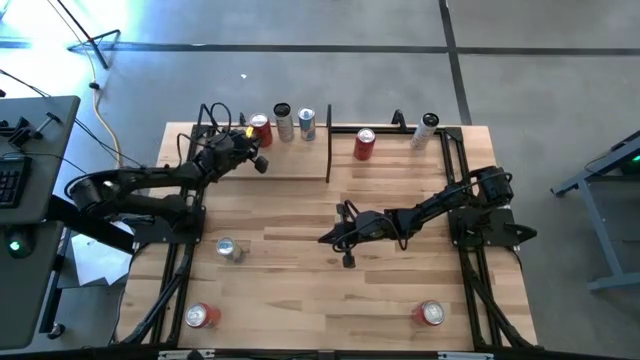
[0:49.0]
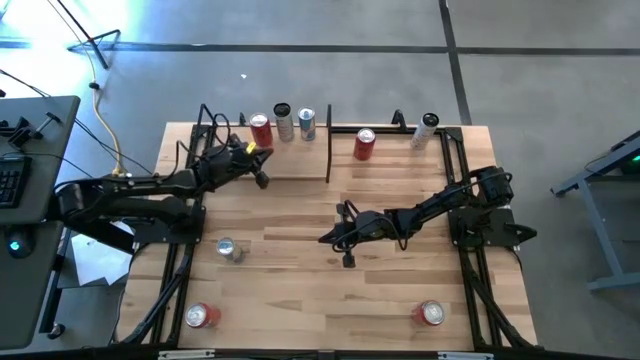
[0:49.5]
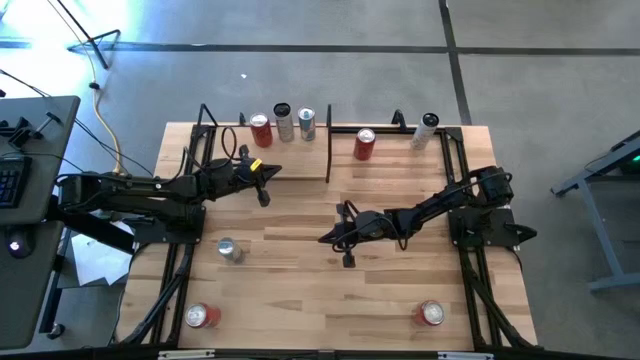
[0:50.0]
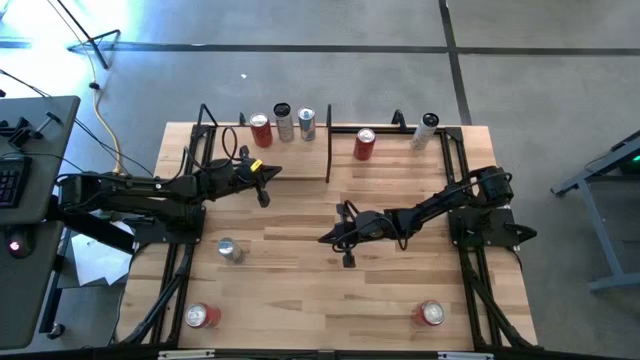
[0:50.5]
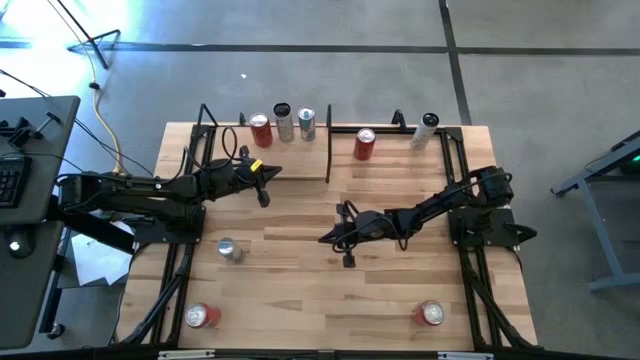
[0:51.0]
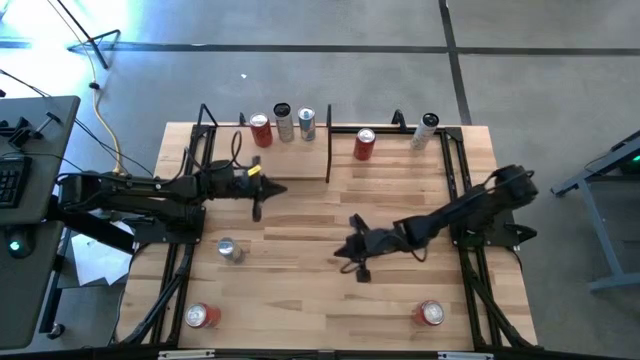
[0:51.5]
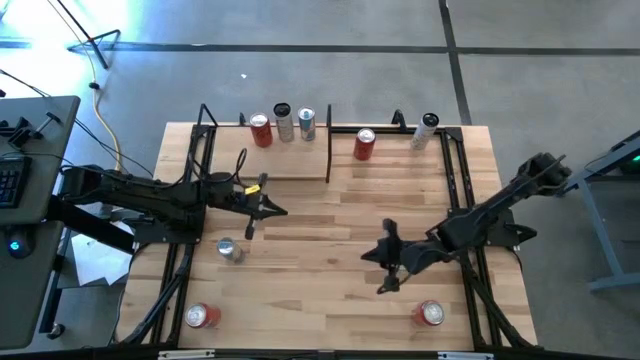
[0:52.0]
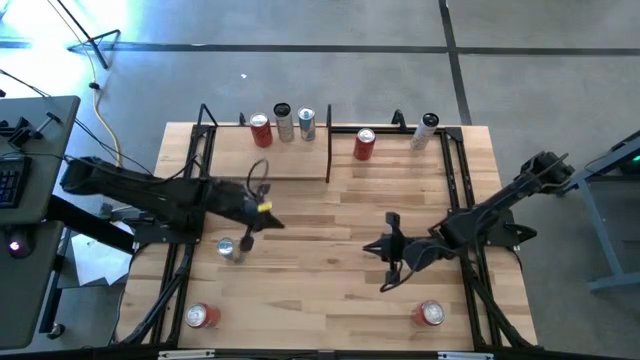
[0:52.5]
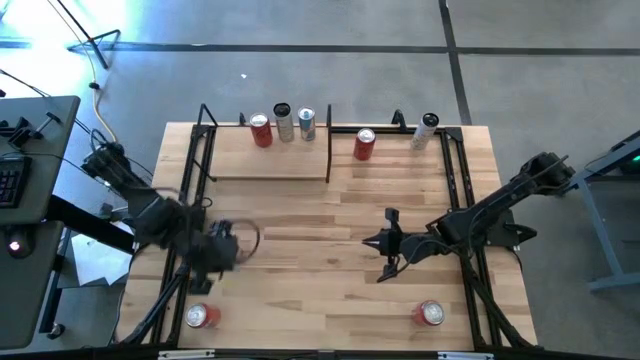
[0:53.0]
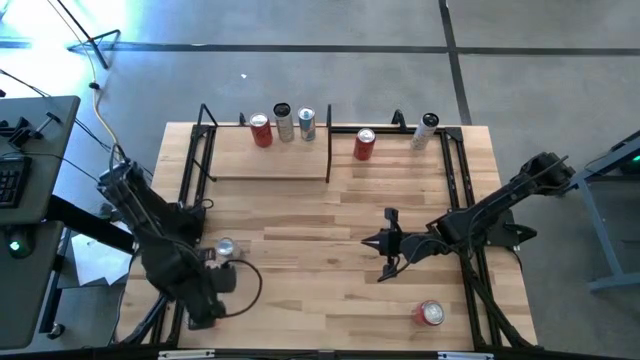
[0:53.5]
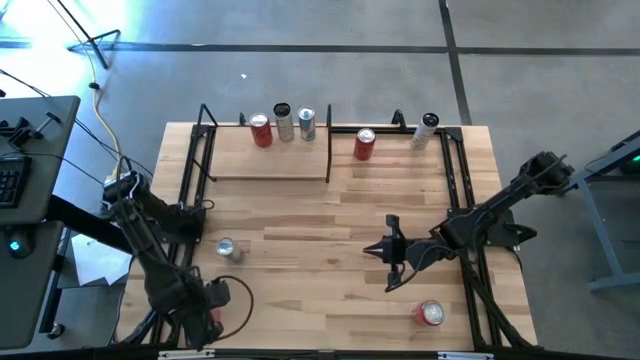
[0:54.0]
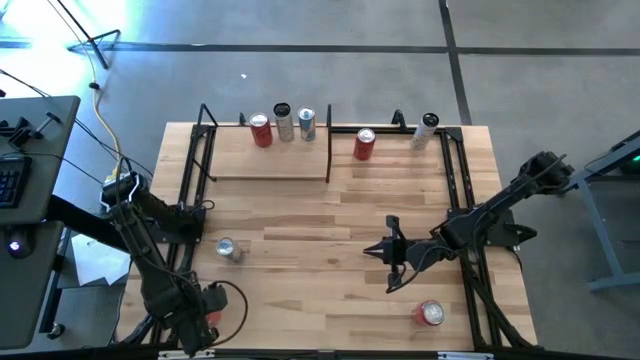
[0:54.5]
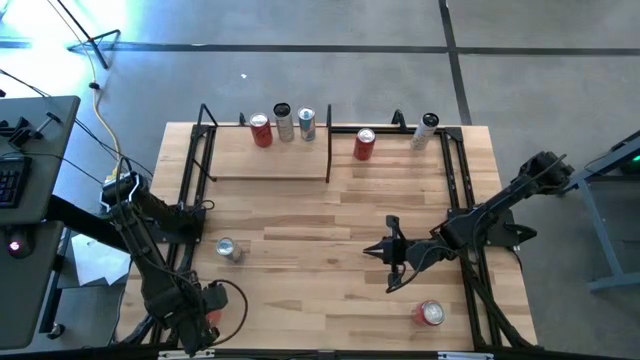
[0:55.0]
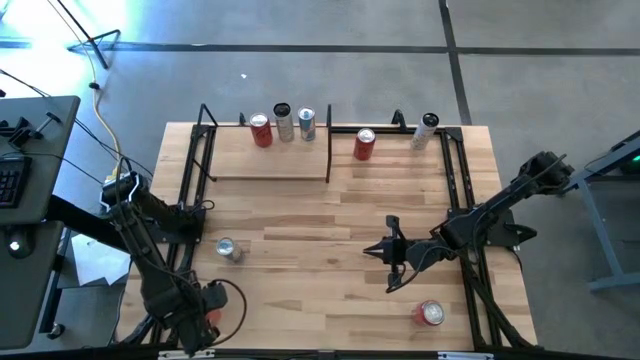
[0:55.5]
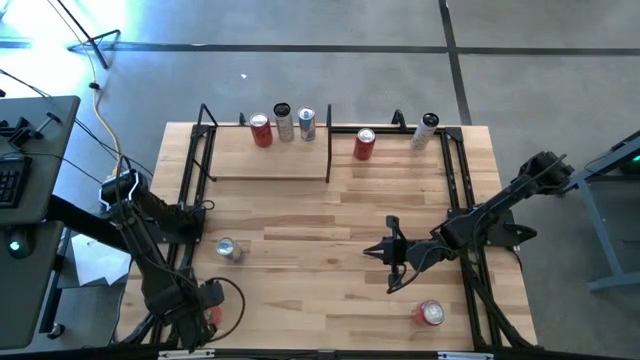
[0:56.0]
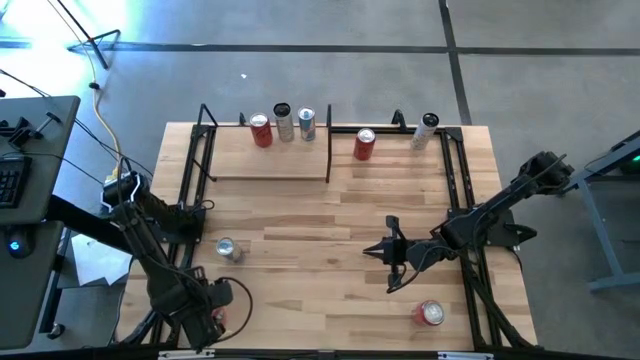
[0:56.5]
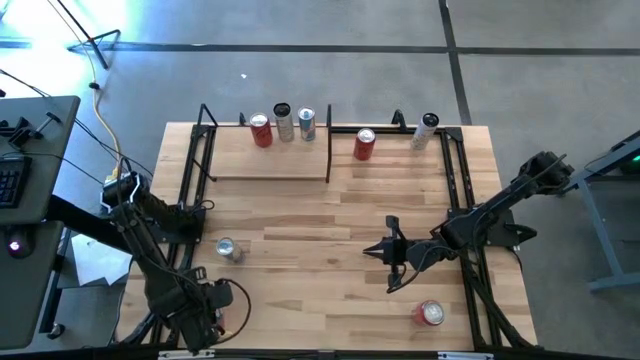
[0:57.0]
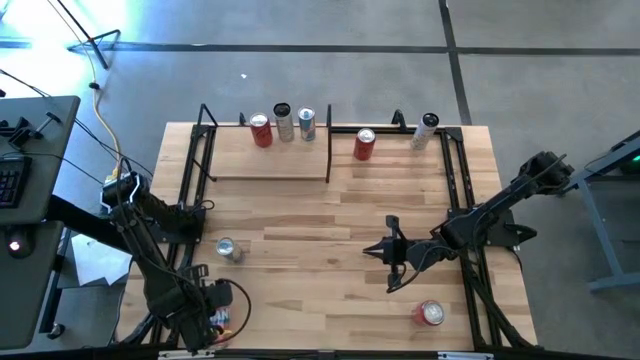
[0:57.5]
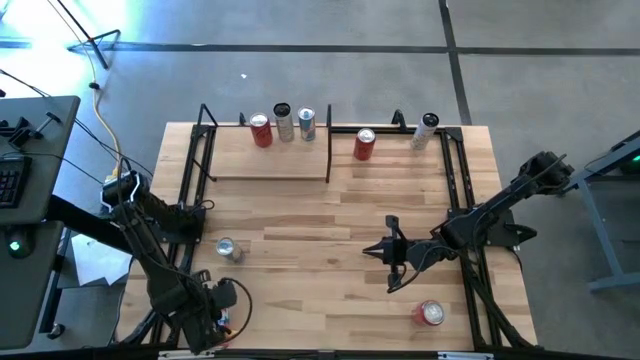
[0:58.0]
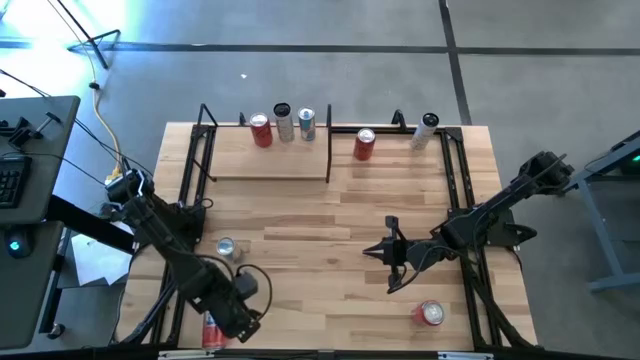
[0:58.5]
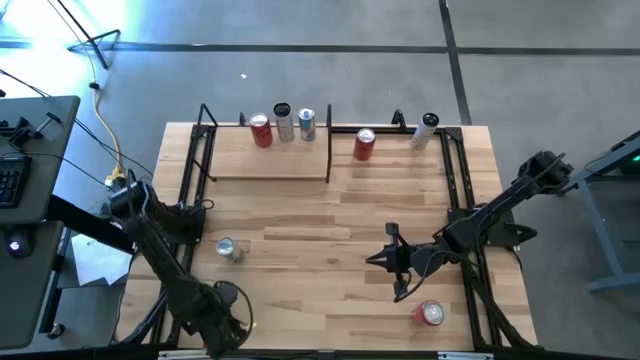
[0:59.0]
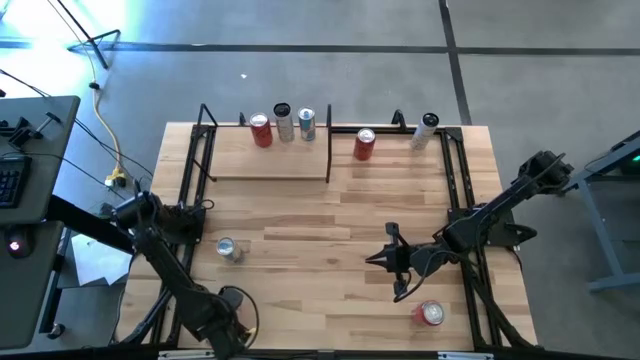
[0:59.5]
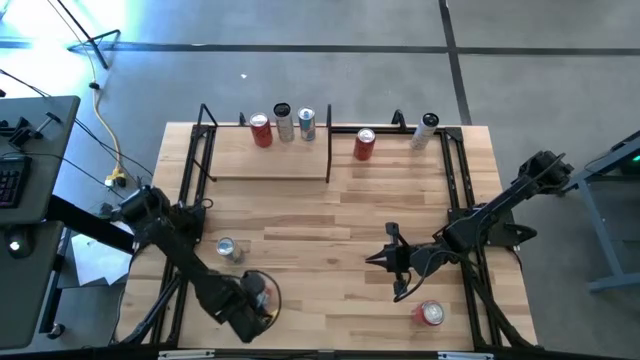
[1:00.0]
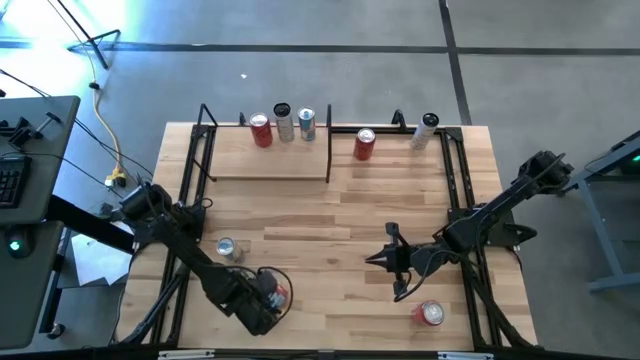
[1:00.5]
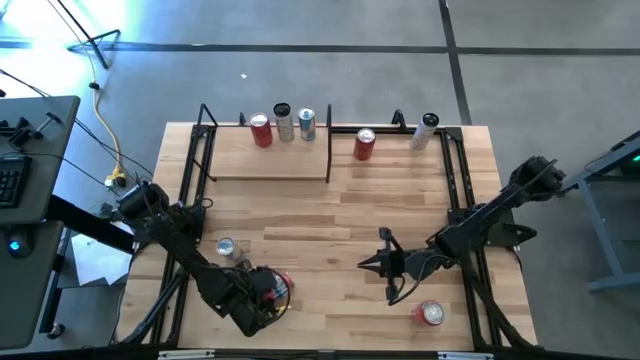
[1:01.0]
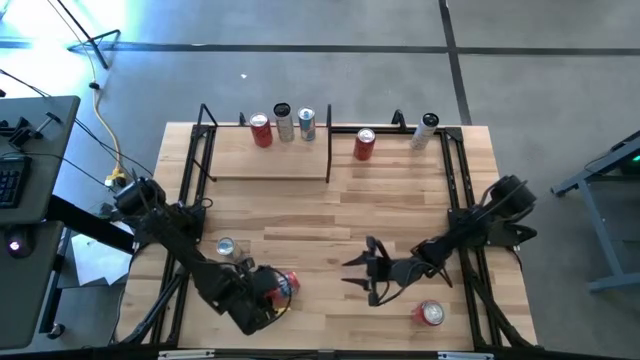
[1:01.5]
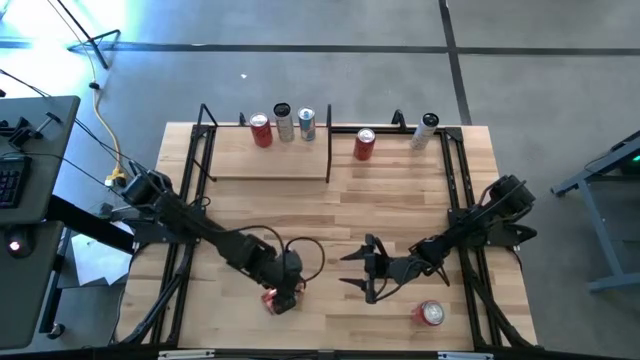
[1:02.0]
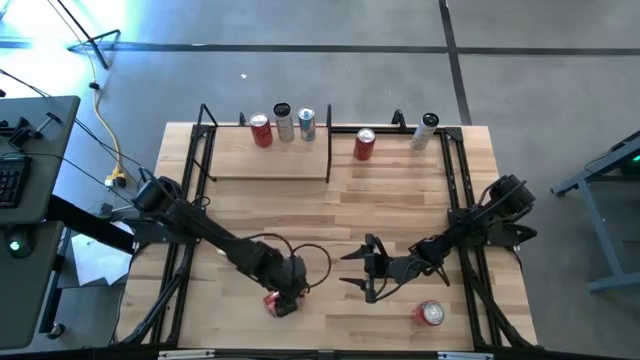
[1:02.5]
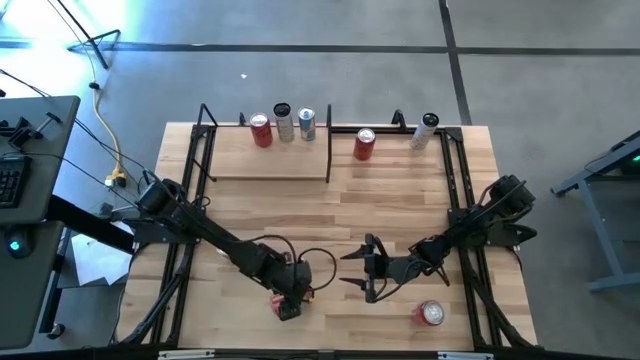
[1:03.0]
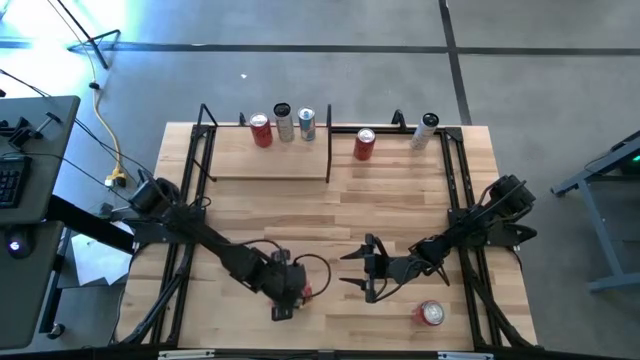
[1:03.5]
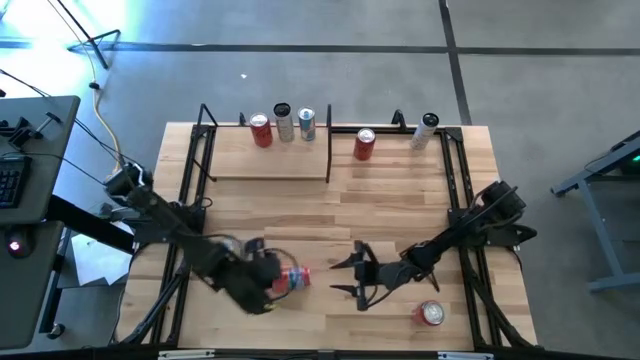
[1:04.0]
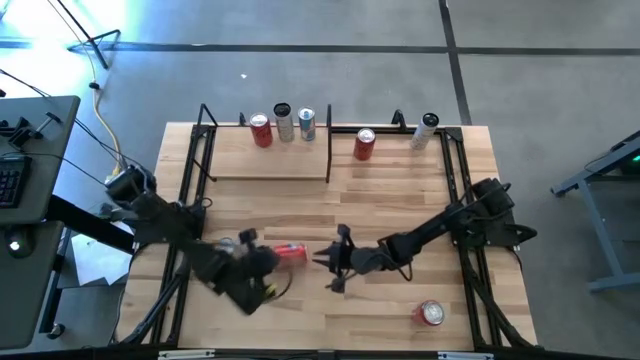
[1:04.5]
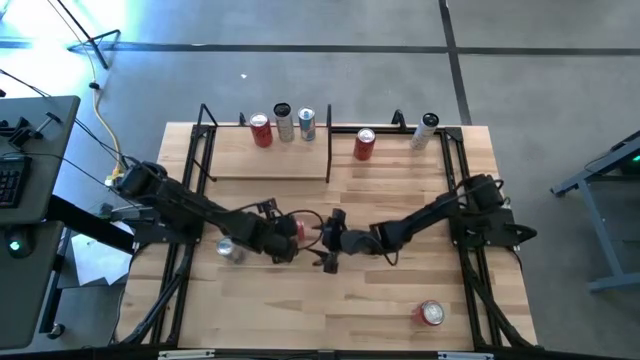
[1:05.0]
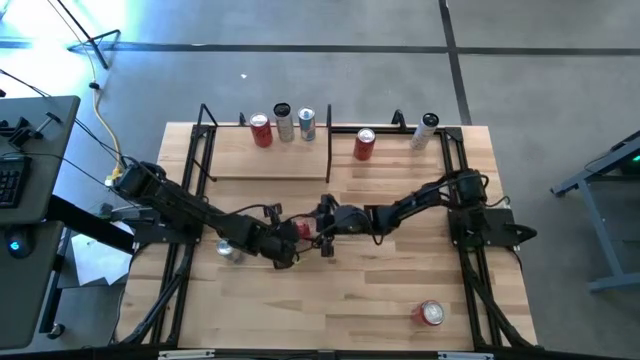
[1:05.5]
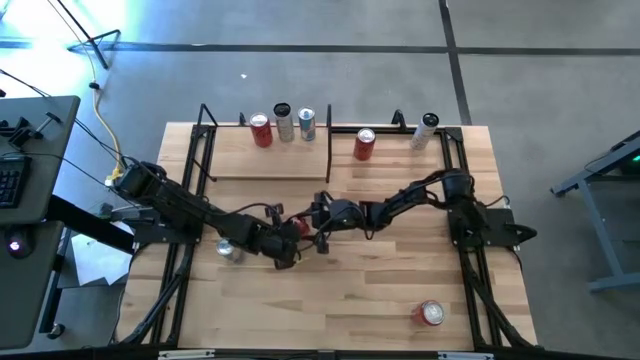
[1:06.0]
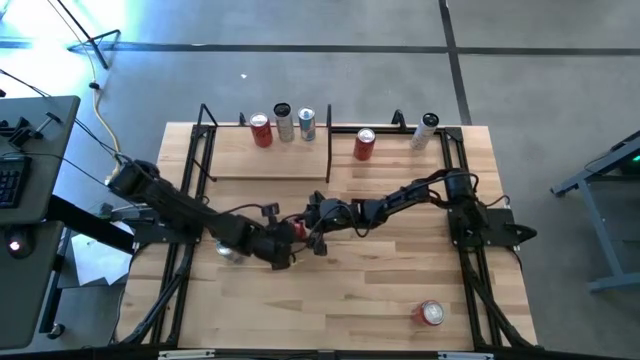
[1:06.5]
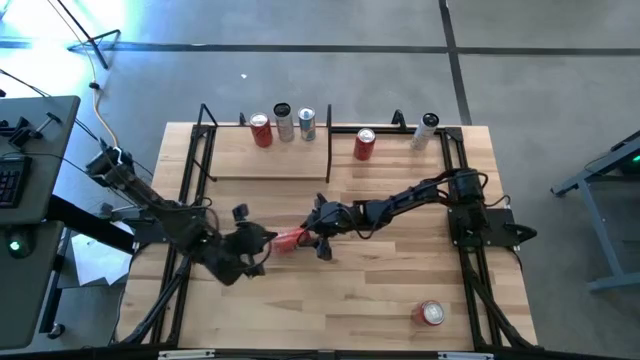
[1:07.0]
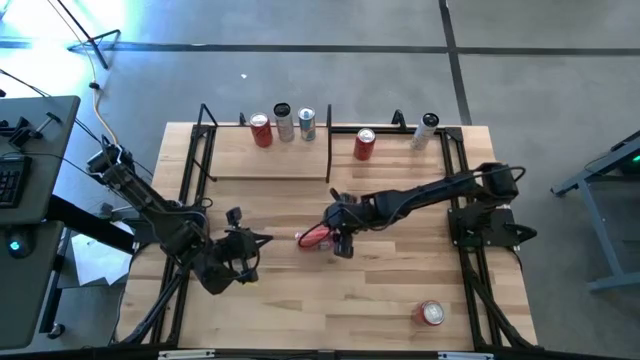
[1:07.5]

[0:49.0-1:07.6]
Task: Place canned beverage on shelf
Put the left red soda can on the shelf
